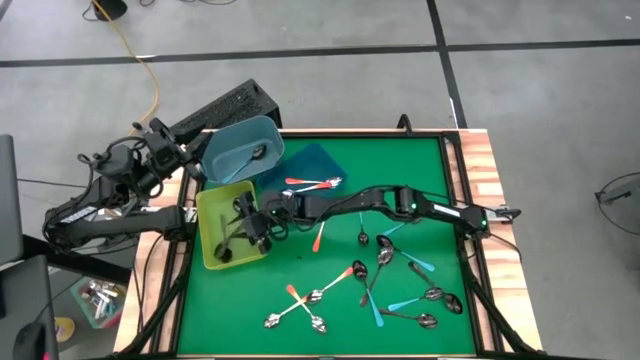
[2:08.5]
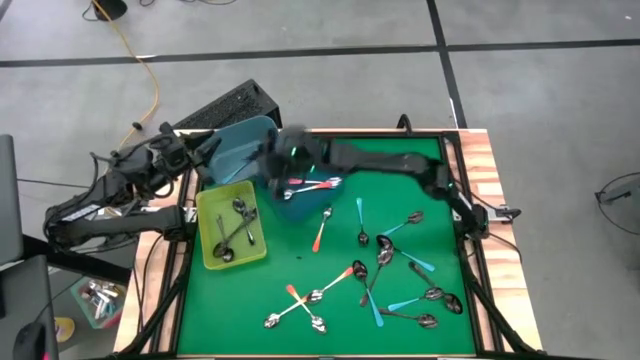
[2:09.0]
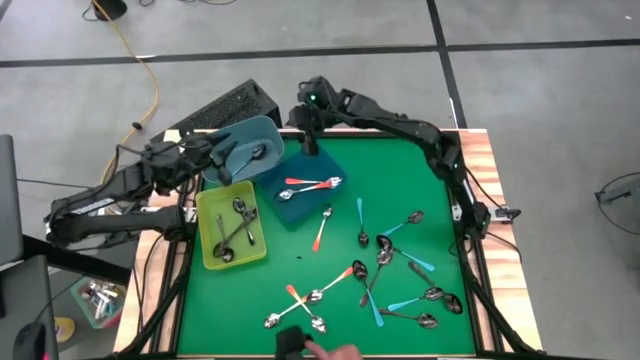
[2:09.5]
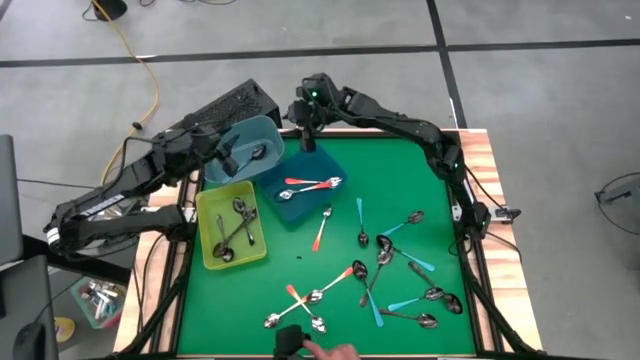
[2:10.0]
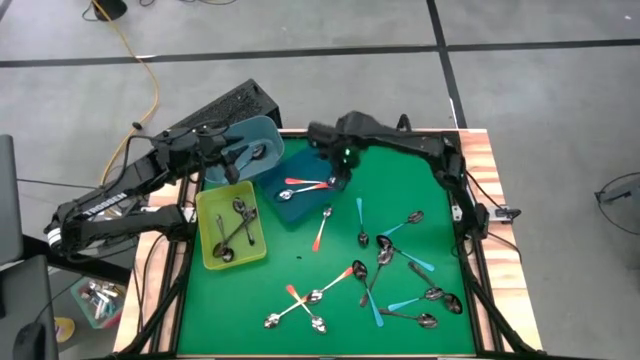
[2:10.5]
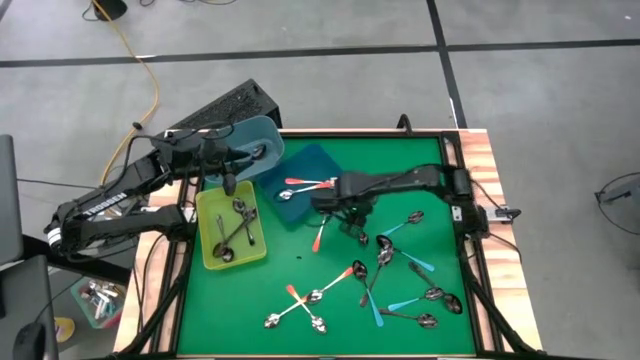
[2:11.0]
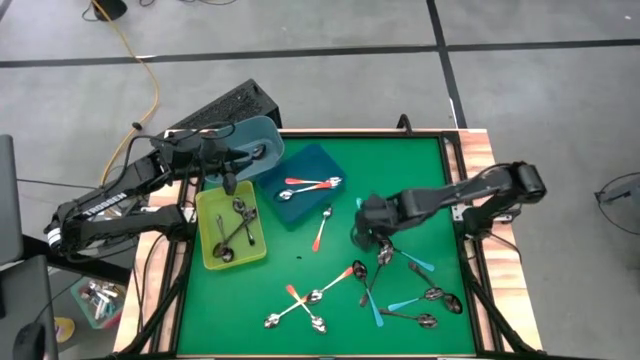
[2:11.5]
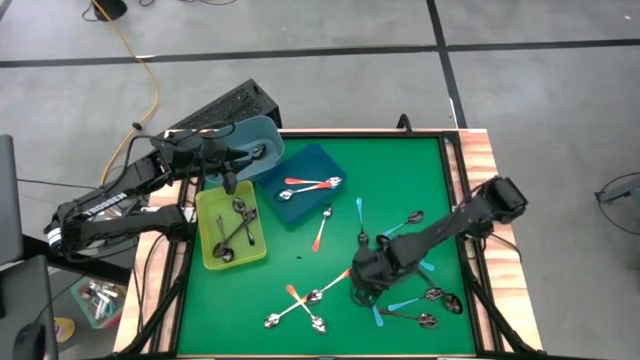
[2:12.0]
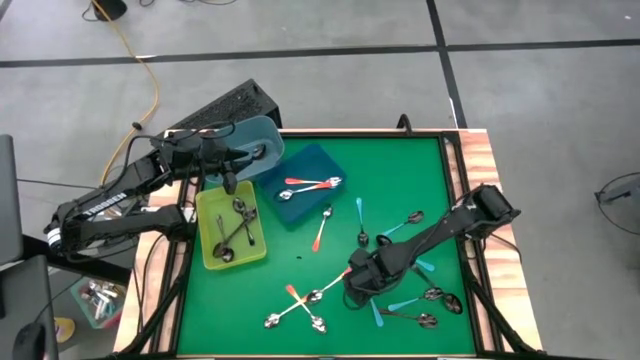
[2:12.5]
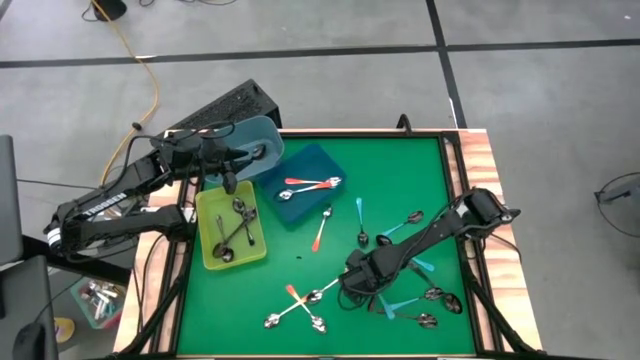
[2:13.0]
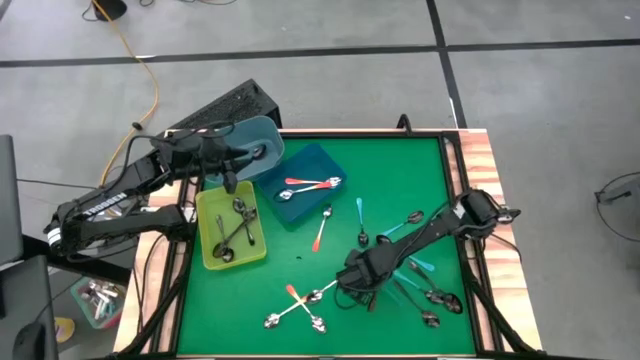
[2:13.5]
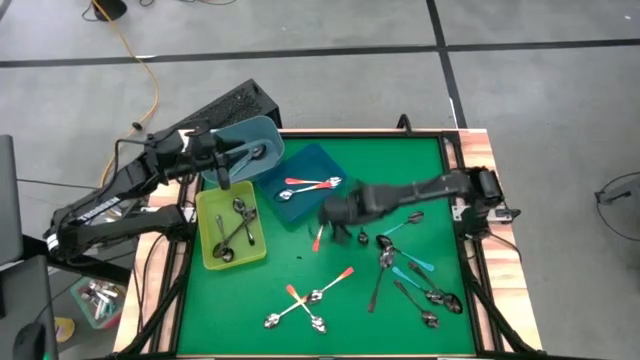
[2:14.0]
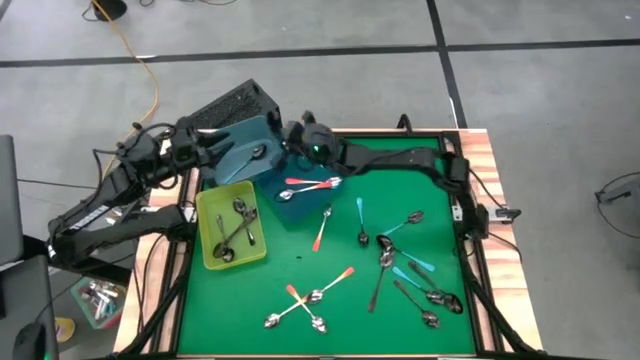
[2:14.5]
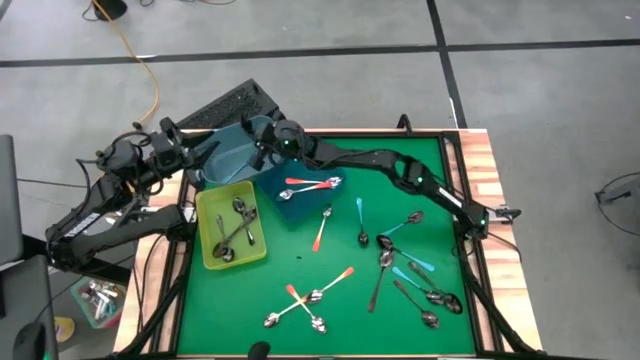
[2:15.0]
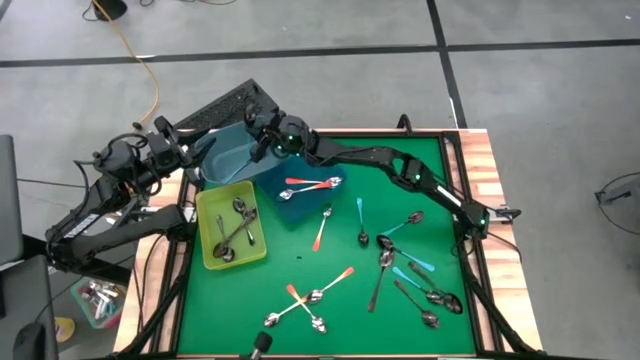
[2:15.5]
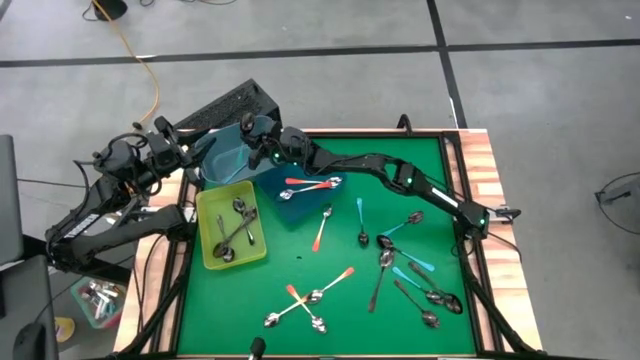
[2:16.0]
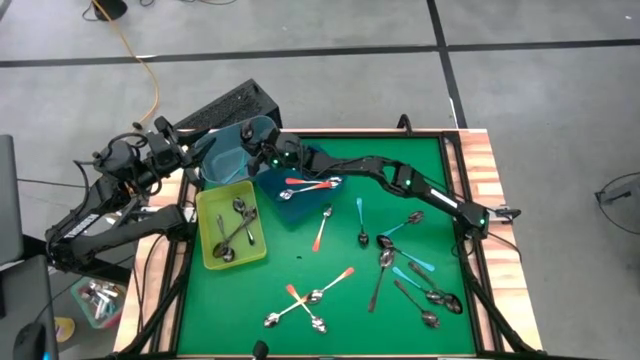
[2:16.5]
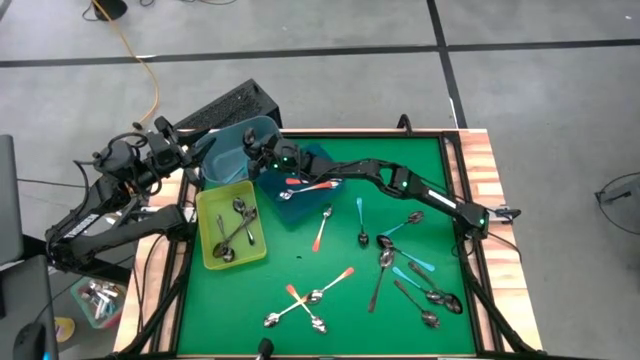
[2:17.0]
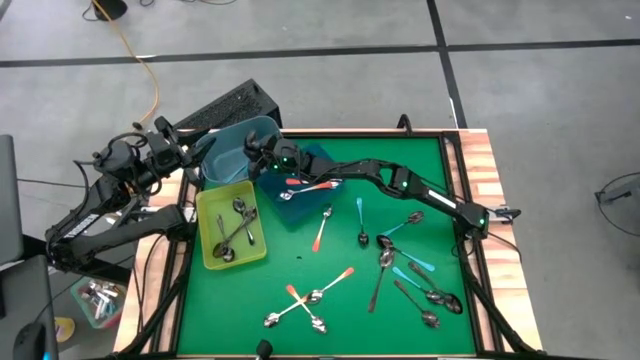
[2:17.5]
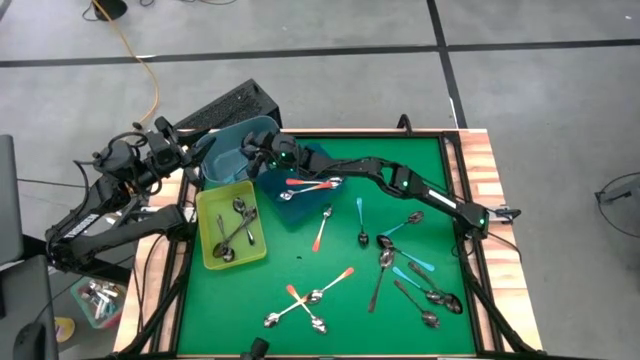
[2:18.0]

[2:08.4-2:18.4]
Task: Sort silverware by color (type)
Put the blue spoon into the light blue bin

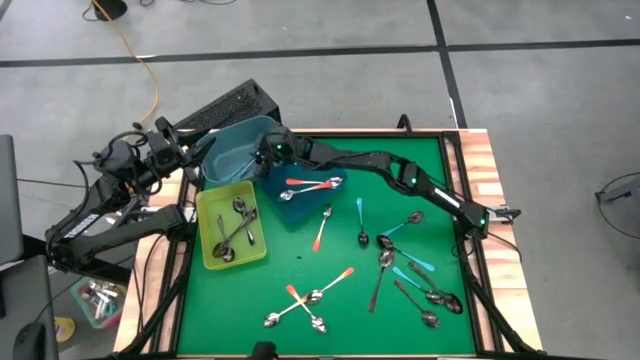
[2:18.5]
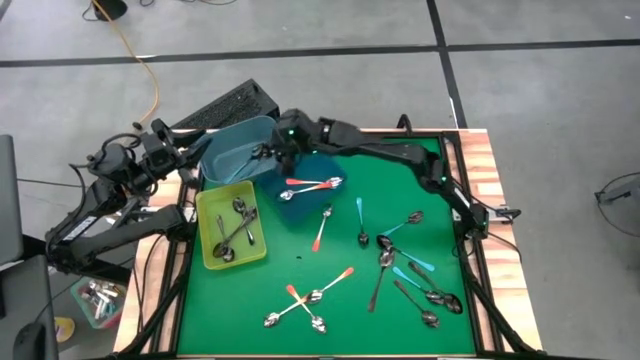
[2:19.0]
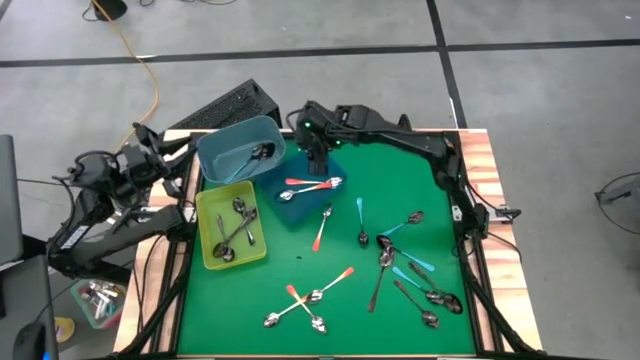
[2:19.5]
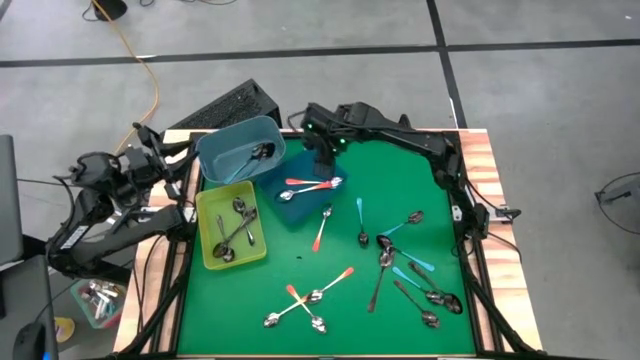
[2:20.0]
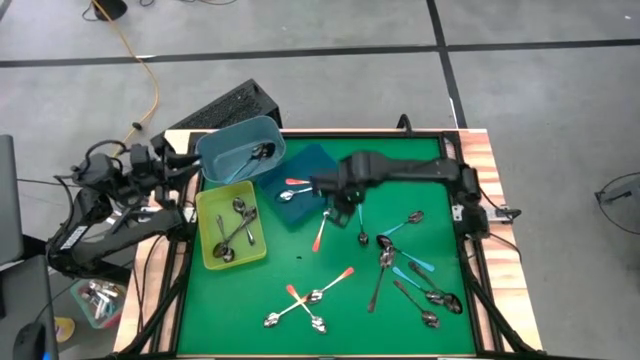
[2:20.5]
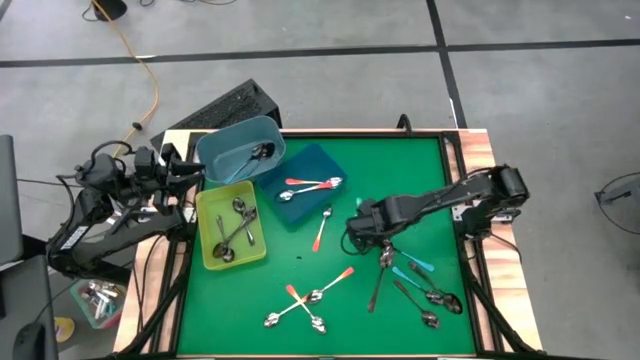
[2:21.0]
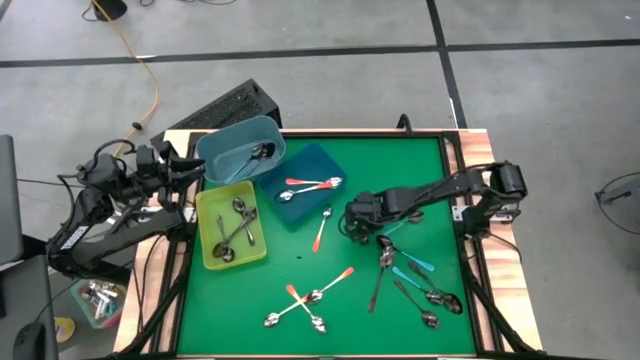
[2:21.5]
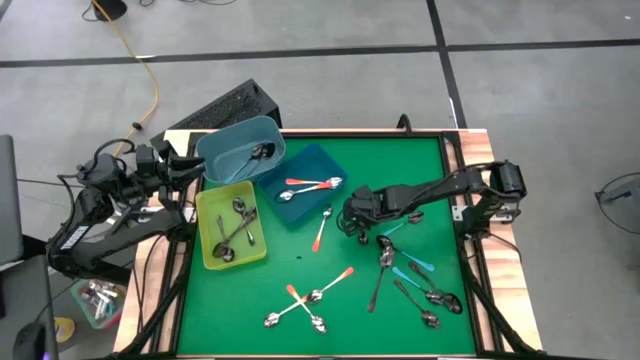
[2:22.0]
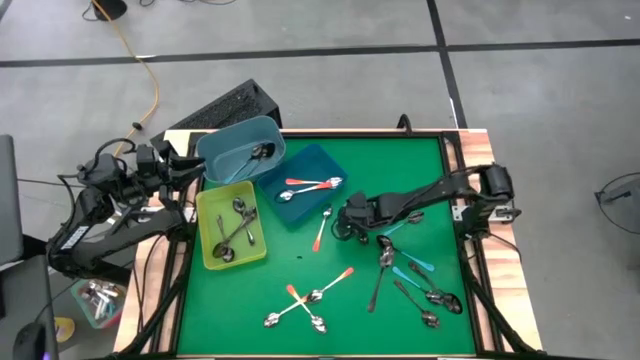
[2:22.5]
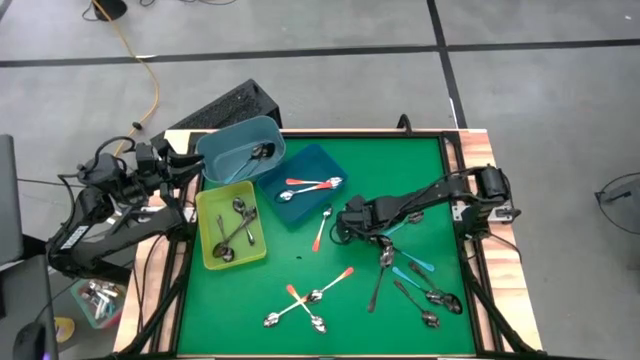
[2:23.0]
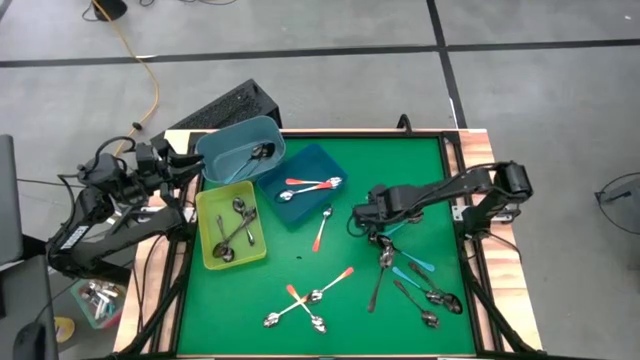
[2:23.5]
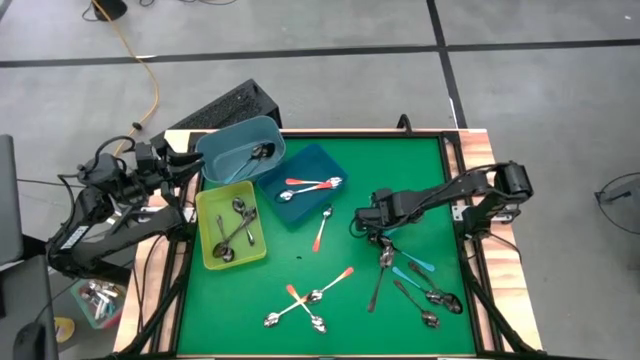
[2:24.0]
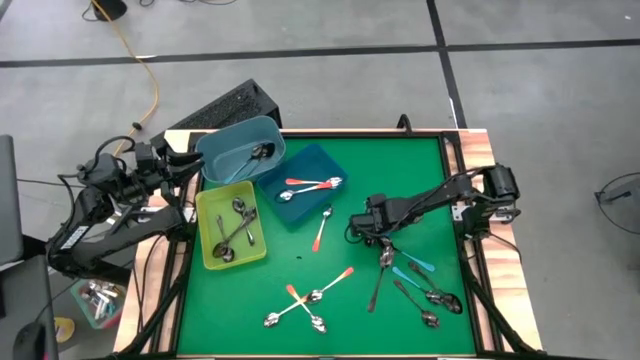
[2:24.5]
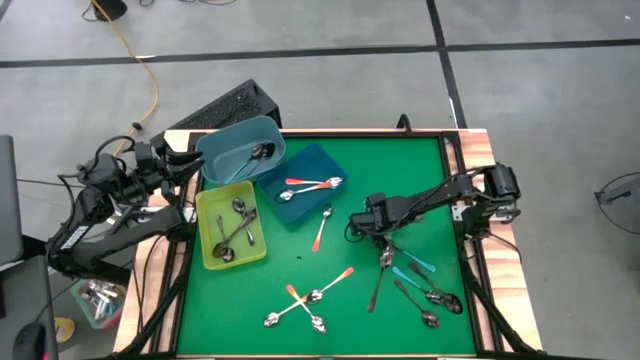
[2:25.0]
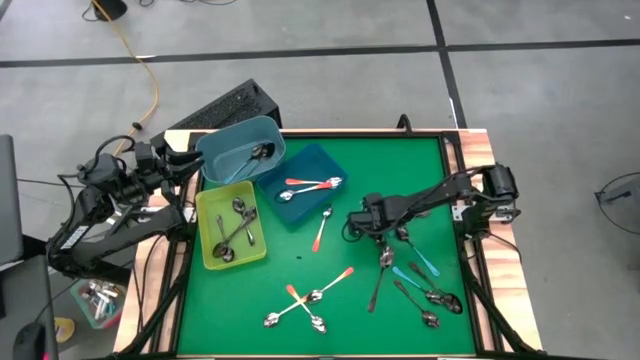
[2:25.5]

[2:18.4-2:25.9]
Put the blue spoon into the light blue bin

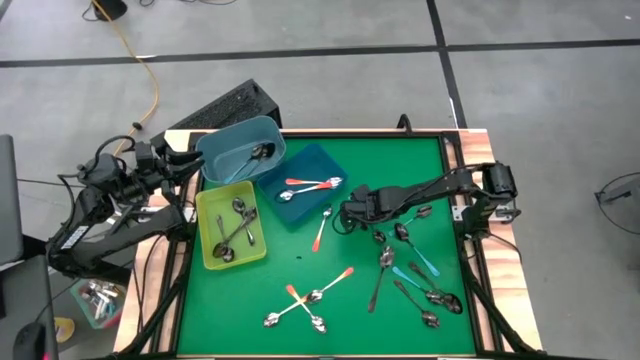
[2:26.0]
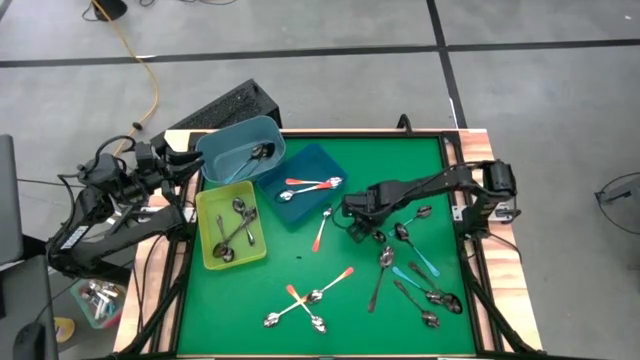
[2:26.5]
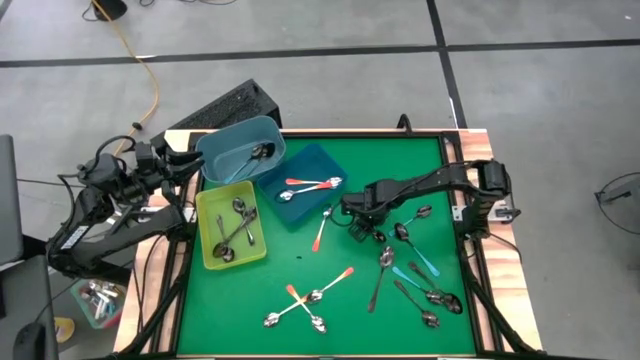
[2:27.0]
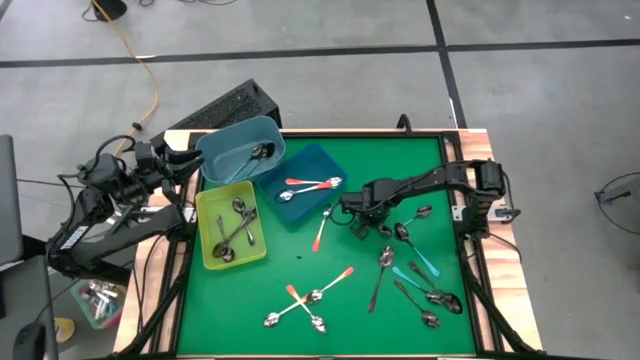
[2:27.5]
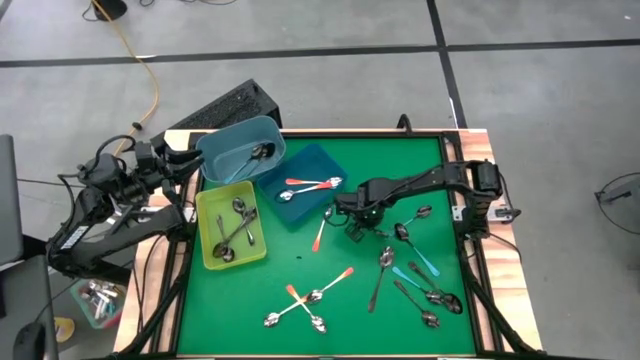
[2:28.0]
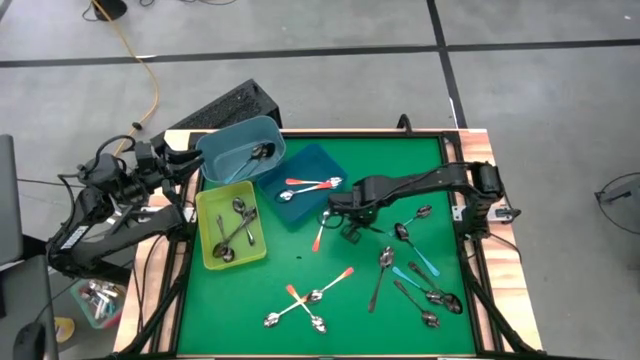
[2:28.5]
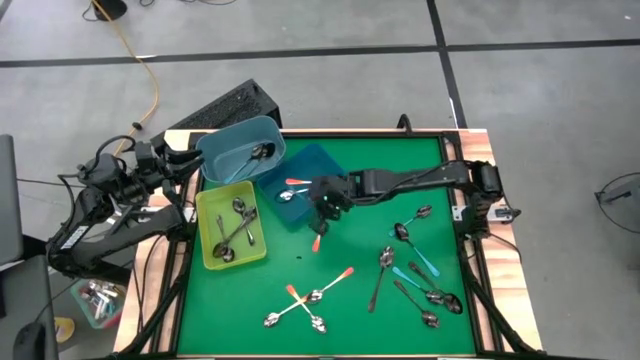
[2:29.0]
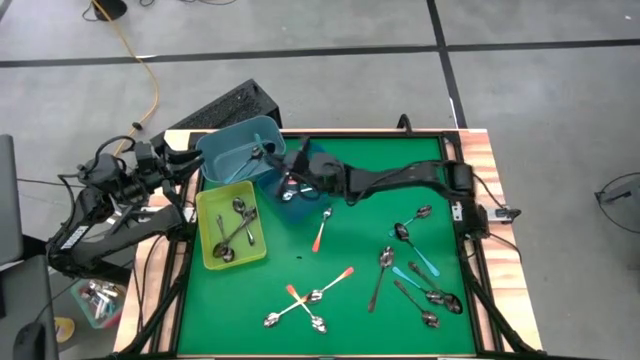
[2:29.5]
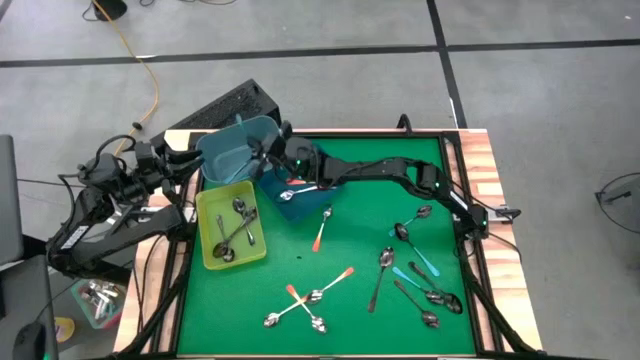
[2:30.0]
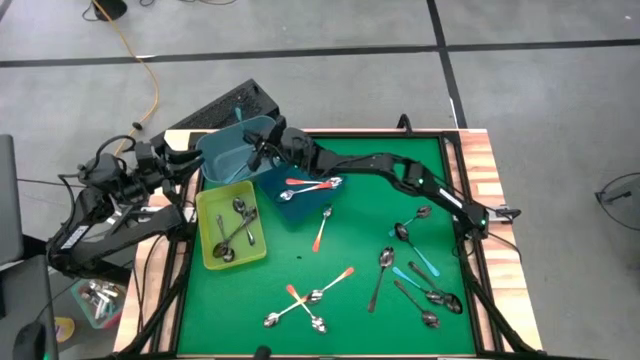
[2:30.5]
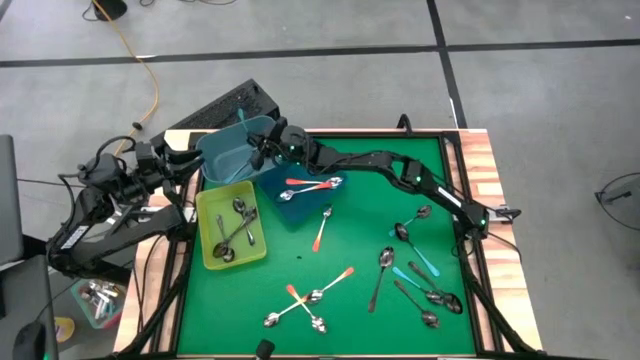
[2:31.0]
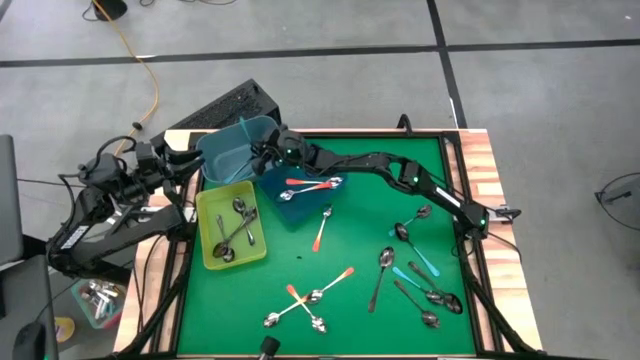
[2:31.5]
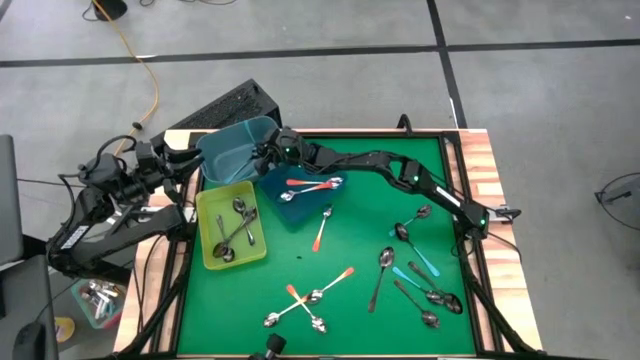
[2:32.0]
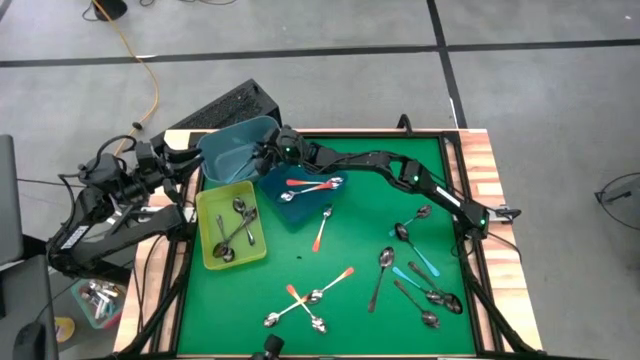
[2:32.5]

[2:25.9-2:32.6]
Put the blue spoon into the light blue bin
